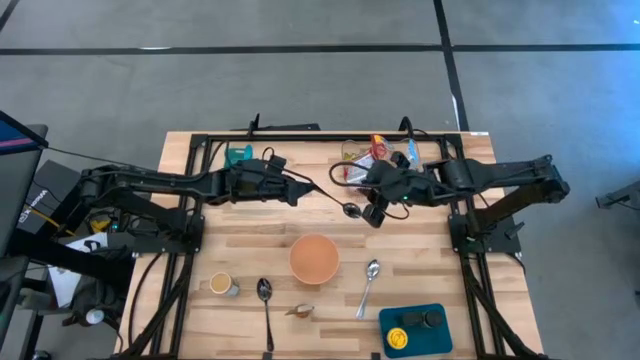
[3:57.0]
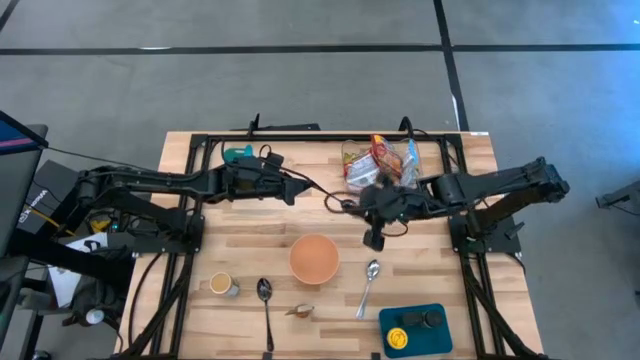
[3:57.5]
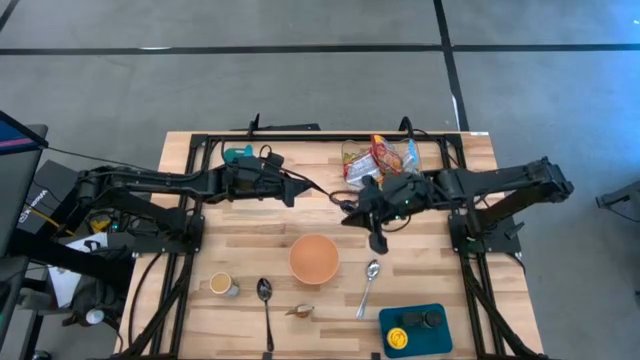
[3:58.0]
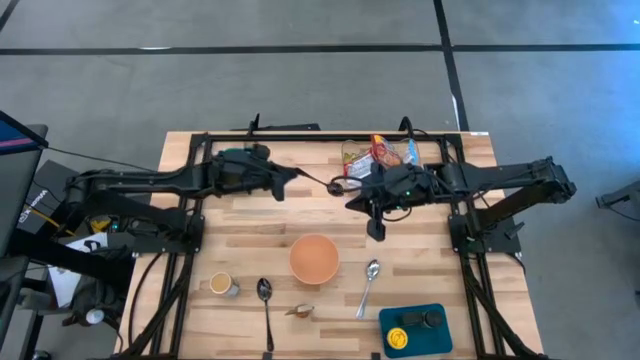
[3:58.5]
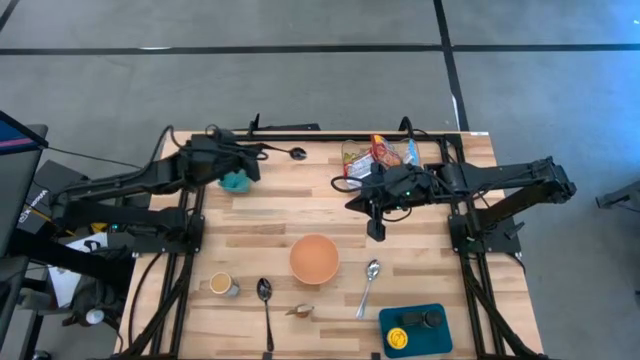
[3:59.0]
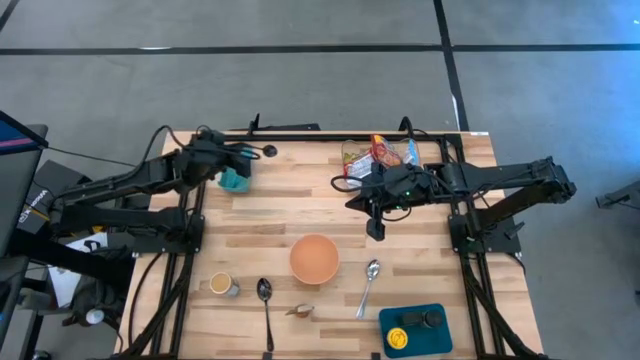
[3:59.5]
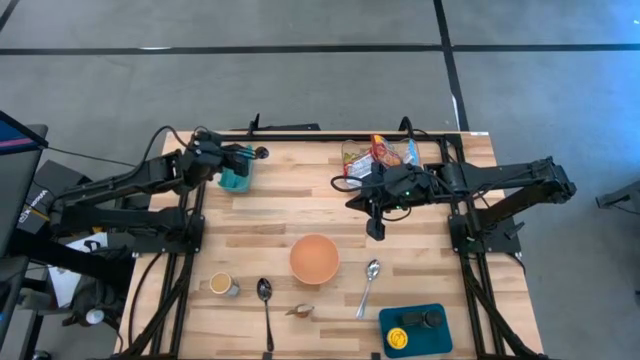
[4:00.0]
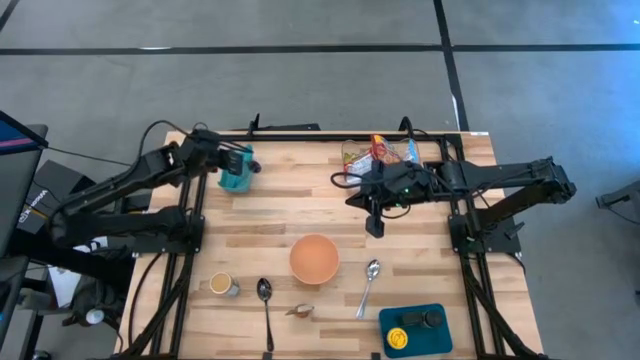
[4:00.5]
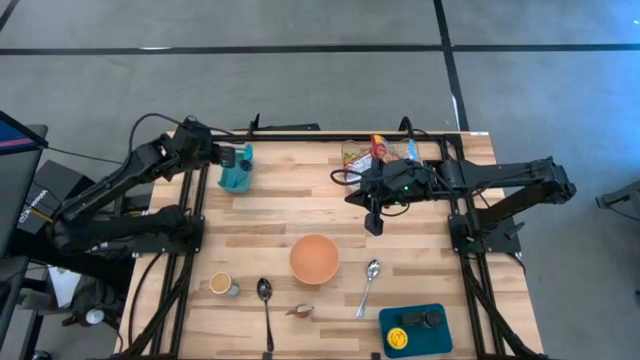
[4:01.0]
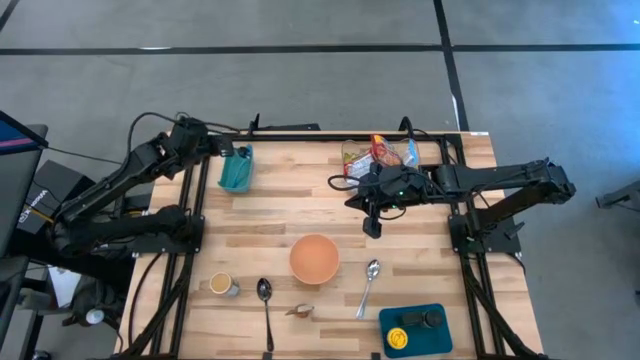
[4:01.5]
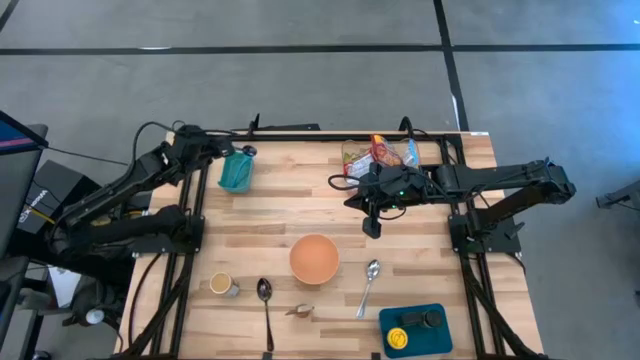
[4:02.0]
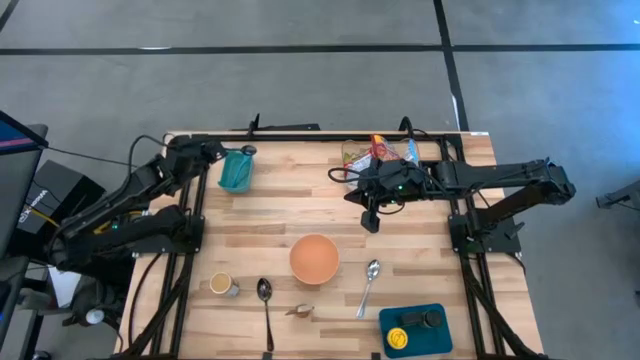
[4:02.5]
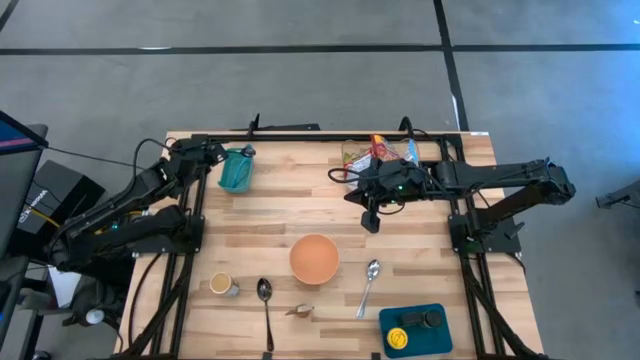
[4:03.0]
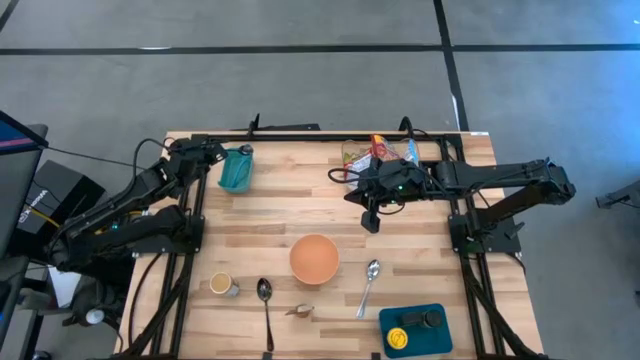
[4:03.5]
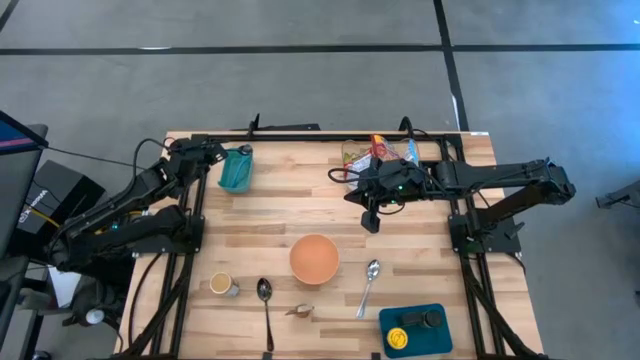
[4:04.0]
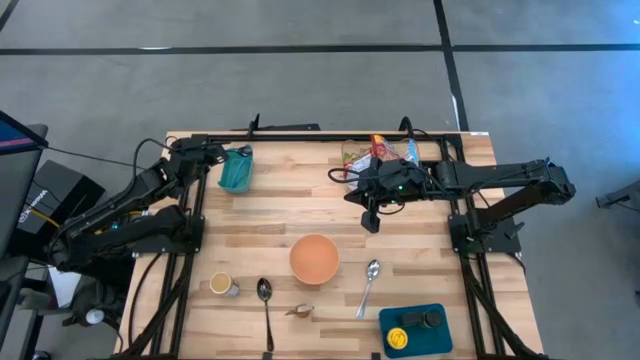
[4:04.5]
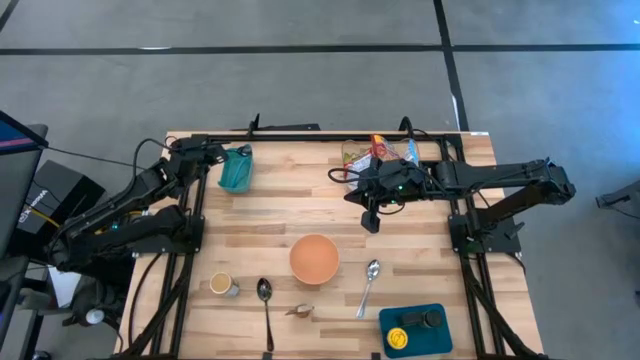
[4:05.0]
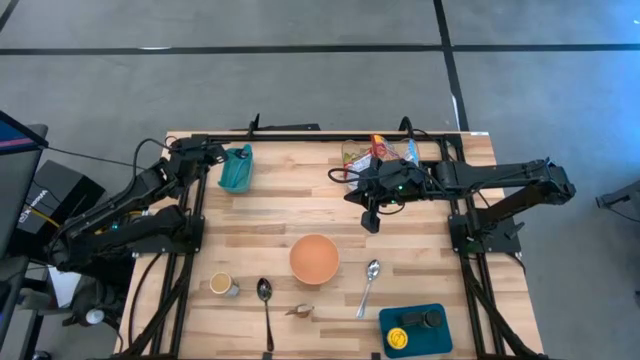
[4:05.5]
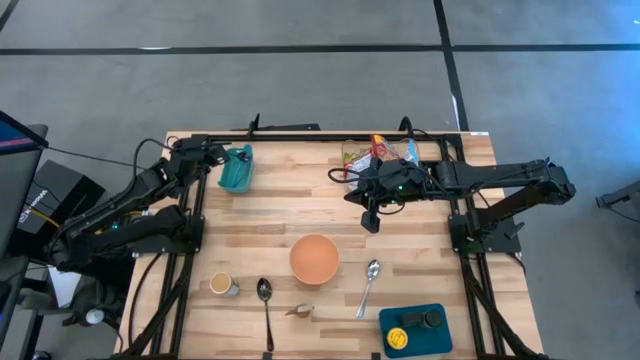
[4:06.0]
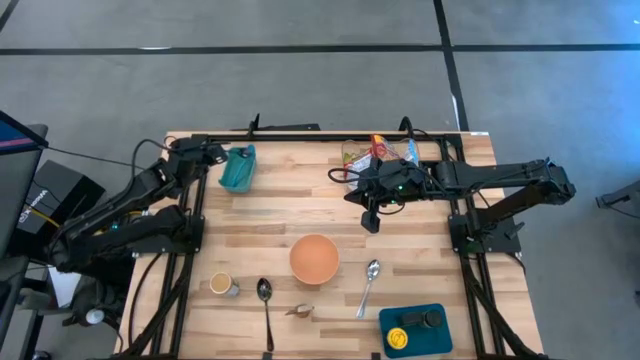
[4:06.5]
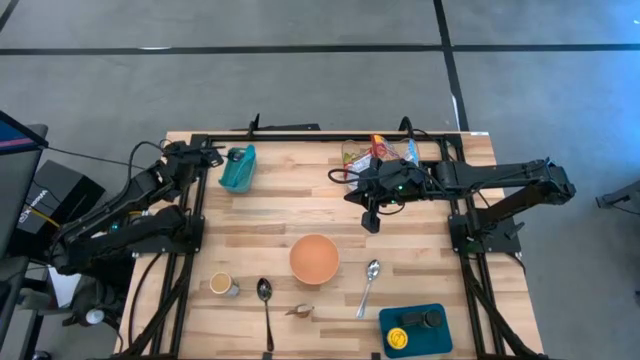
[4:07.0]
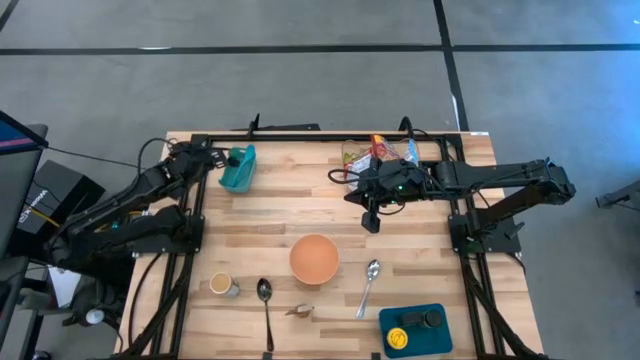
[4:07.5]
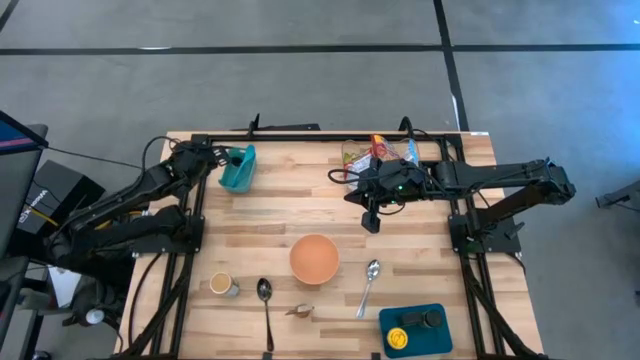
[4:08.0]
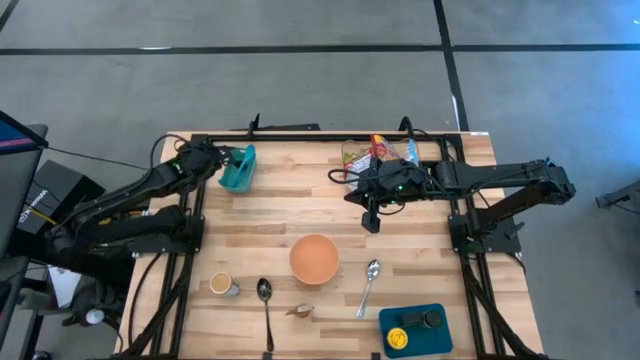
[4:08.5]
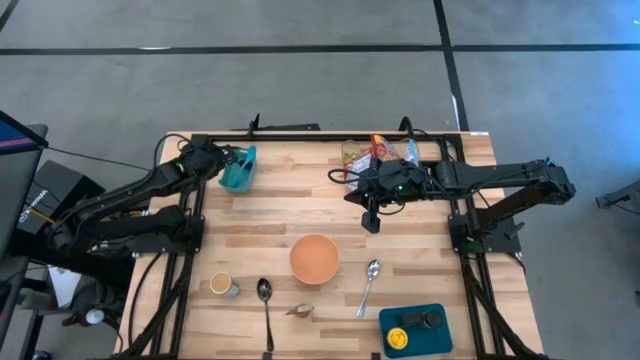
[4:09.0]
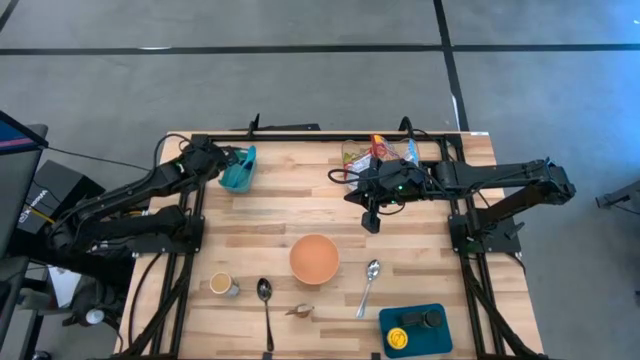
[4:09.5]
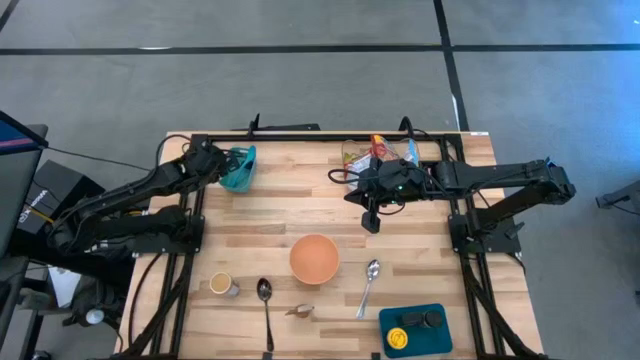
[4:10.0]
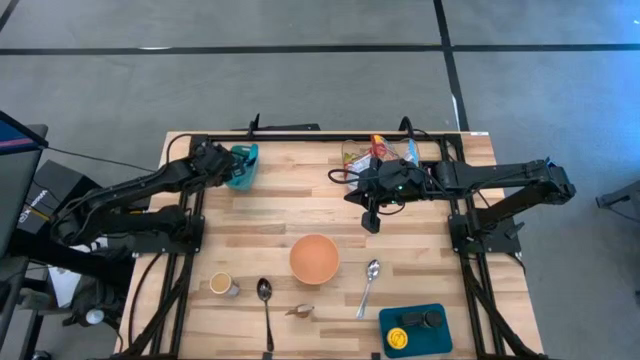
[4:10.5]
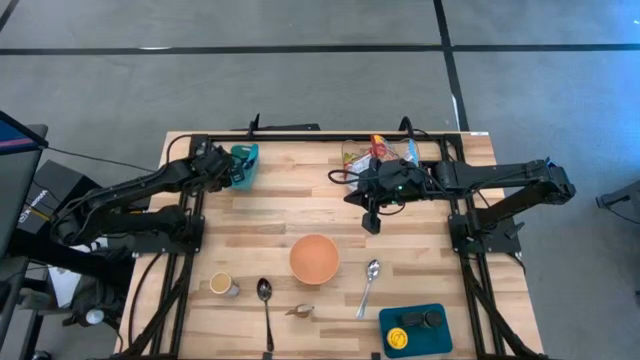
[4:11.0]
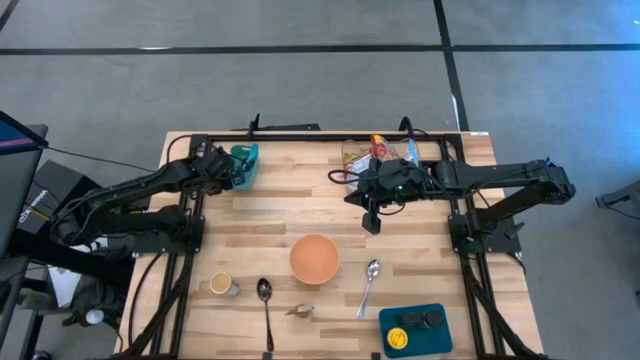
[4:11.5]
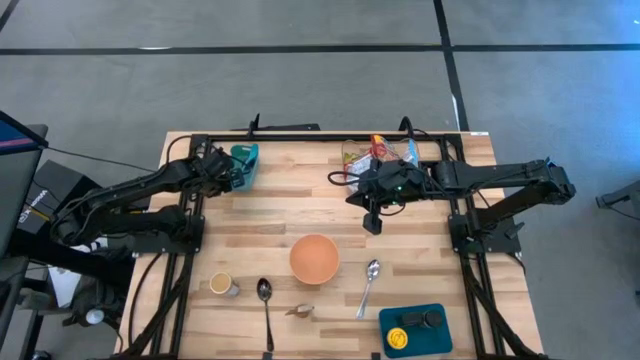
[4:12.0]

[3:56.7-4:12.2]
Task: Pick & Place Food Item
Put the top black spoon into the light green bin

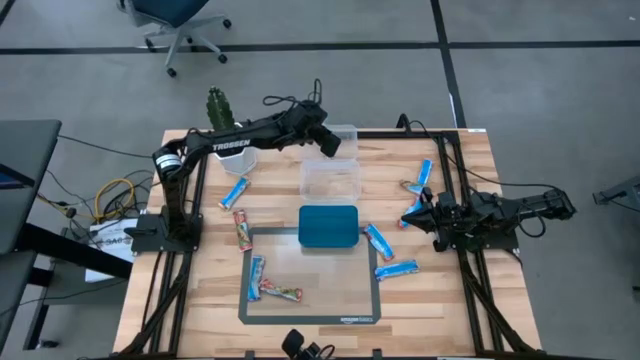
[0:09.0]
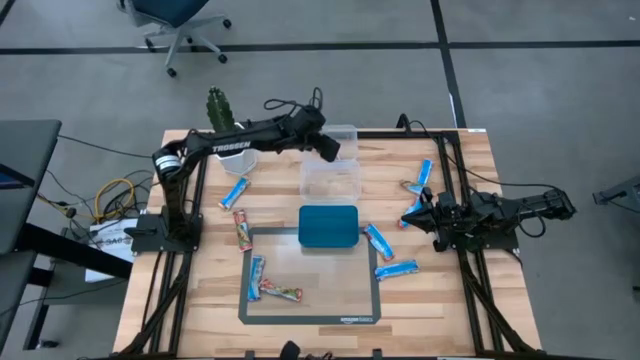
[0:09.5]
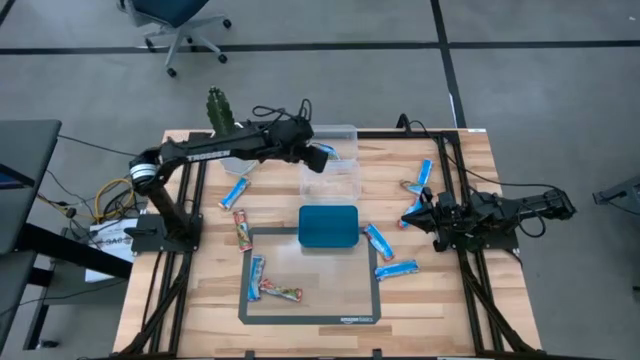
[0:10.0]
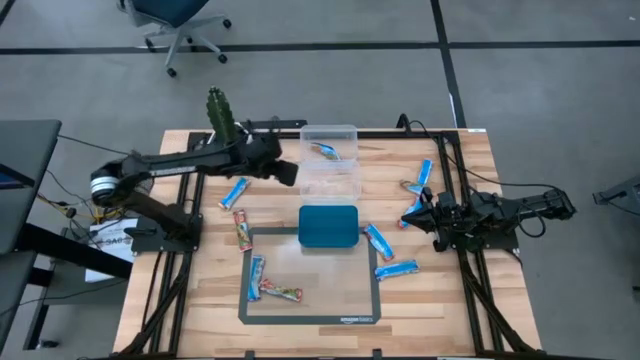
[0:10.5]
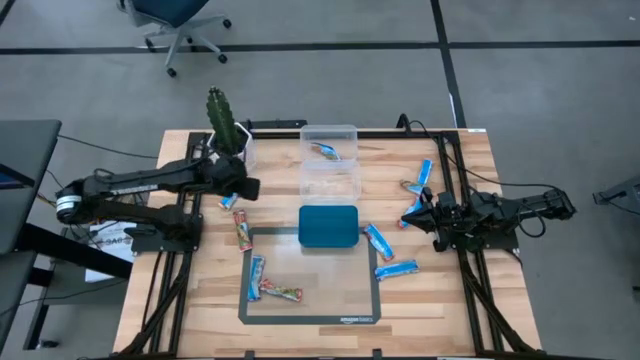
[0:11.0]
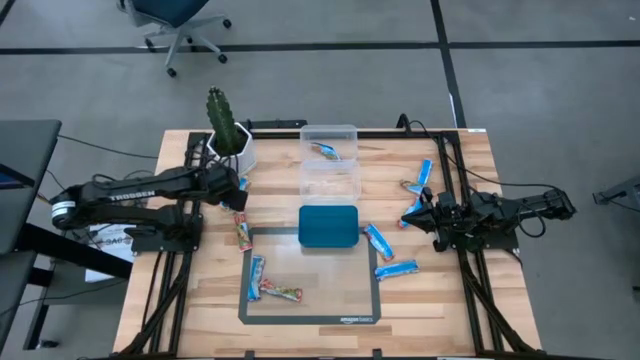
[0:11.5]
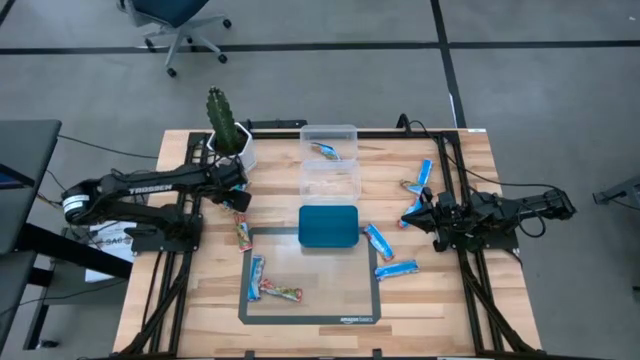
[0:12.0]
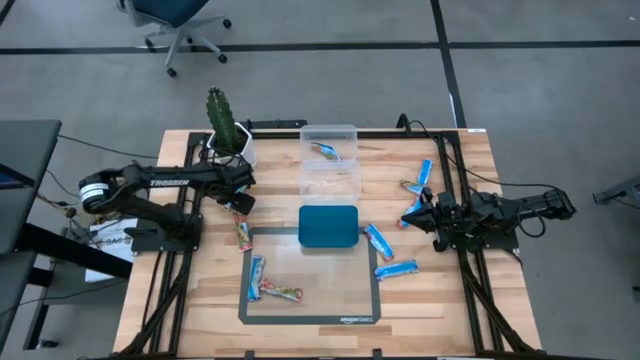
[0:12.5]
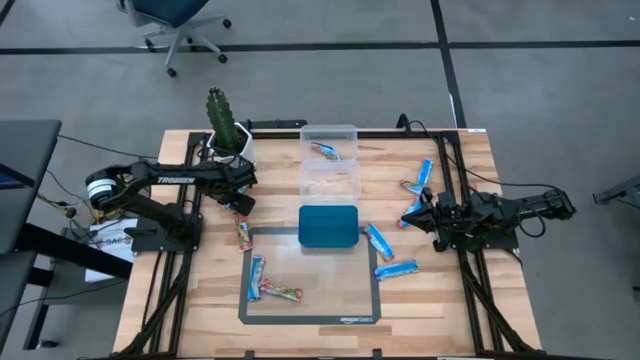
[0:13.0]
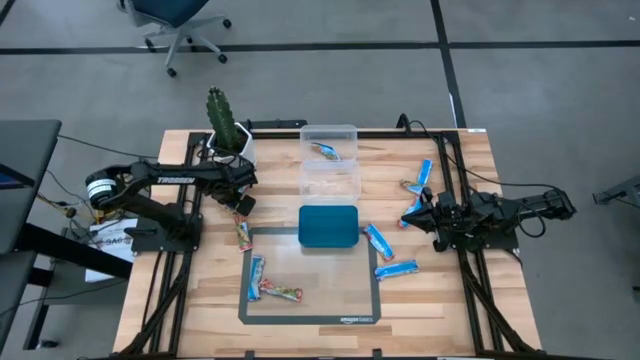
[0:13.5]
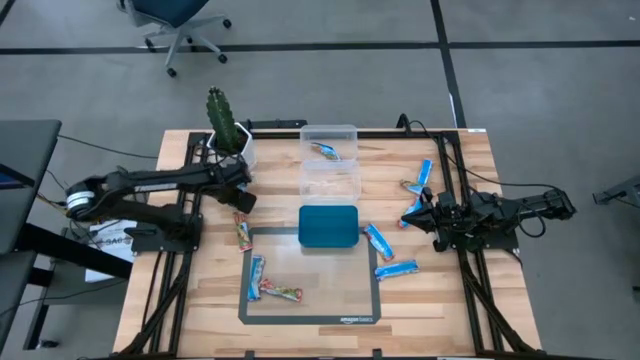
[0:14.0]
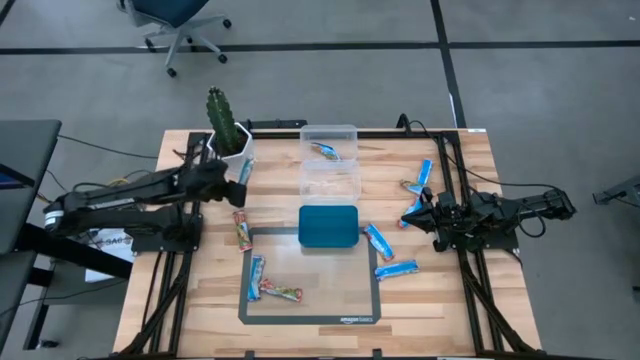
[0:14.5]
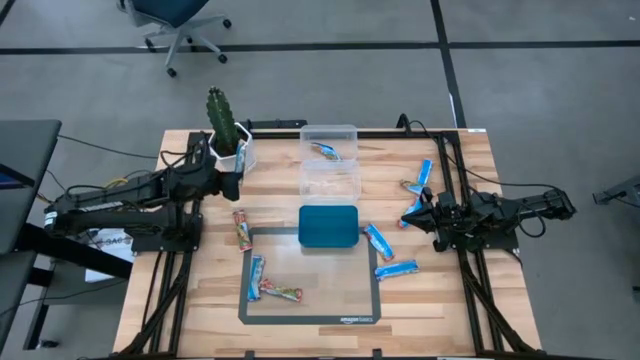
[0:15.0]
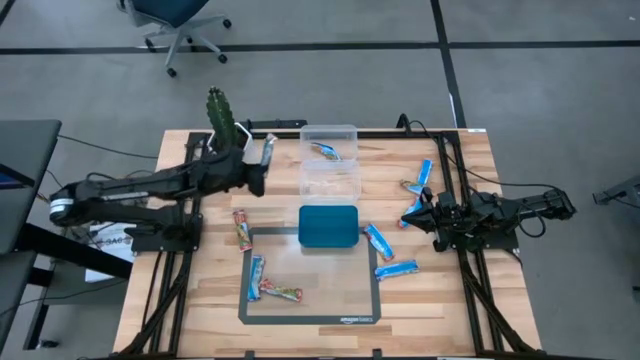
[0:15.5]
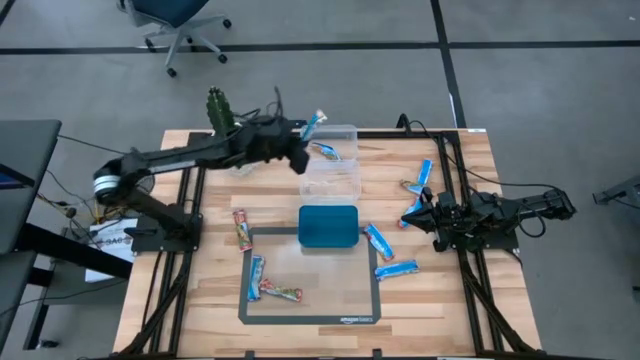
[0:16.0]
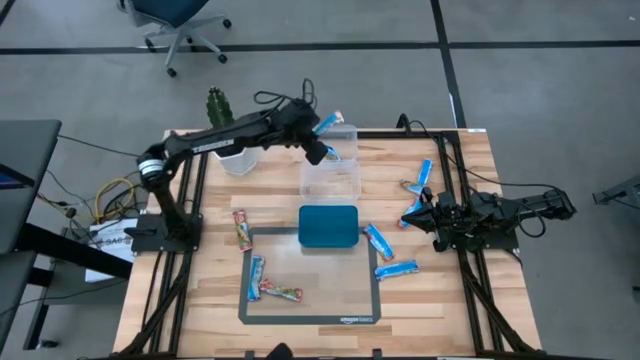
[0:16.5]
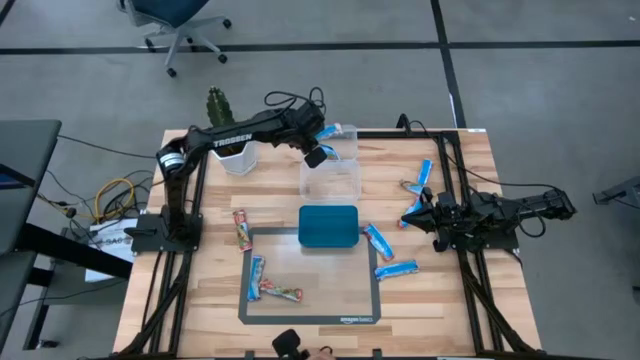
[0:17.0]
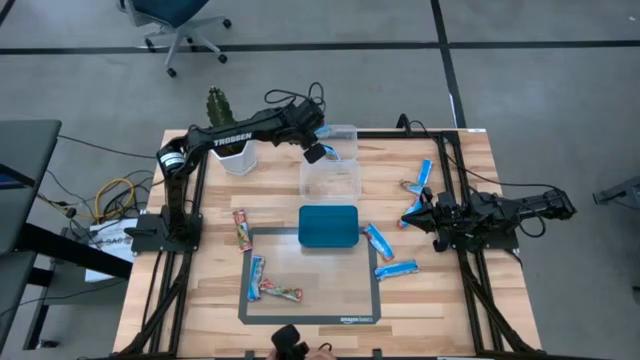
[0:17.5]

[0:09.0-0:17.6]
Task: Pick and place Granola Bars by type
Put the yellow granola bar into the top transparent bin
